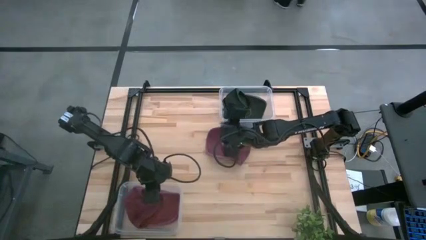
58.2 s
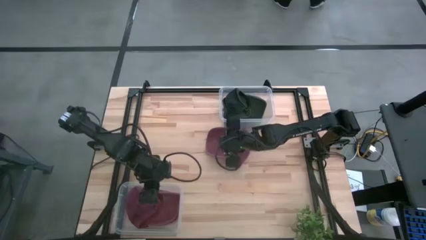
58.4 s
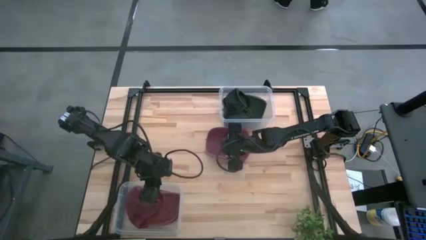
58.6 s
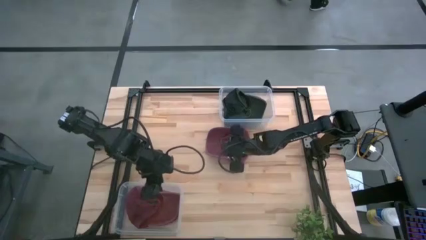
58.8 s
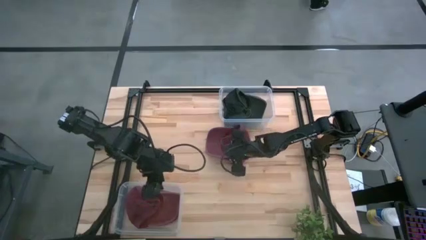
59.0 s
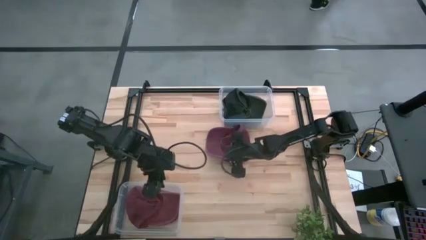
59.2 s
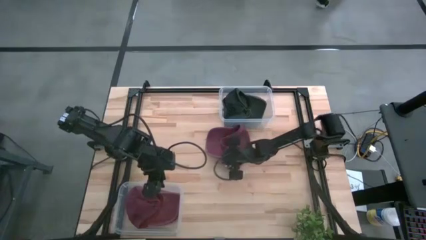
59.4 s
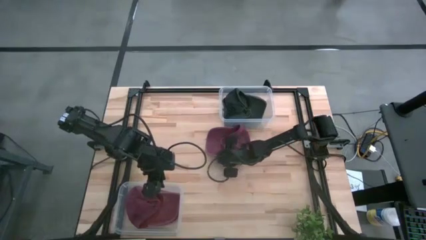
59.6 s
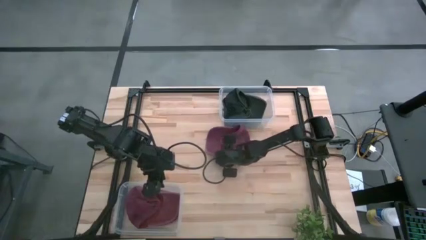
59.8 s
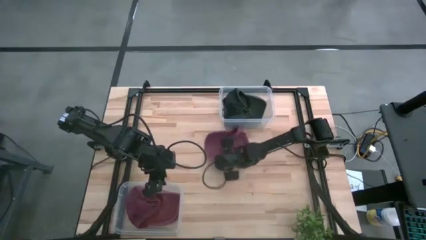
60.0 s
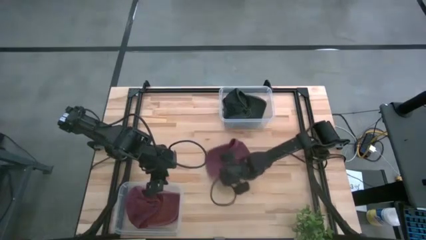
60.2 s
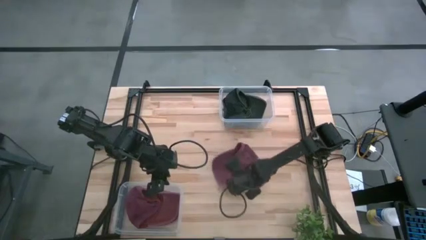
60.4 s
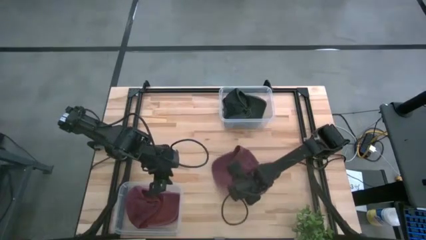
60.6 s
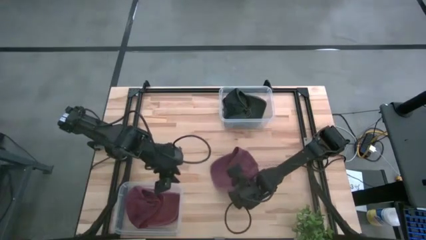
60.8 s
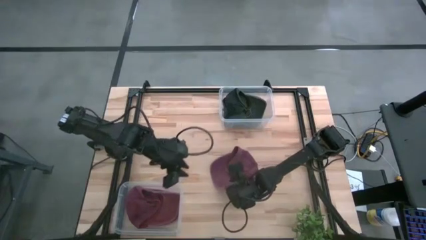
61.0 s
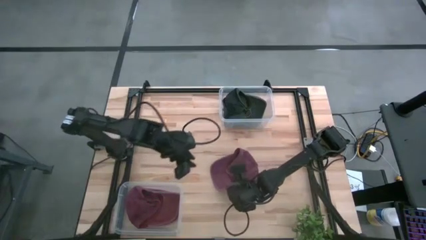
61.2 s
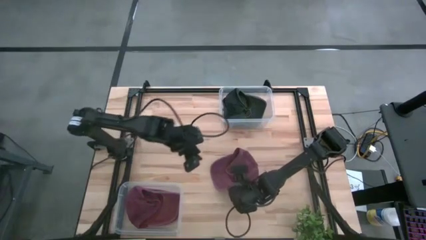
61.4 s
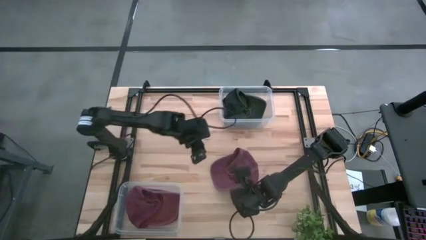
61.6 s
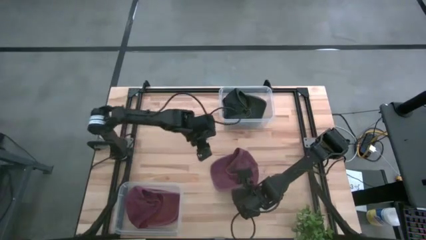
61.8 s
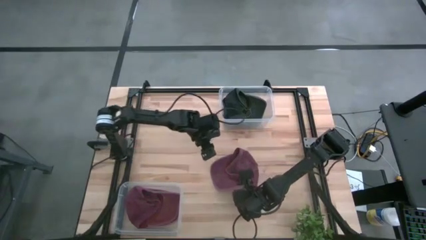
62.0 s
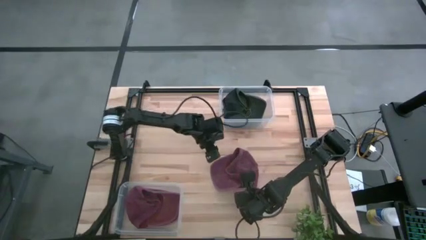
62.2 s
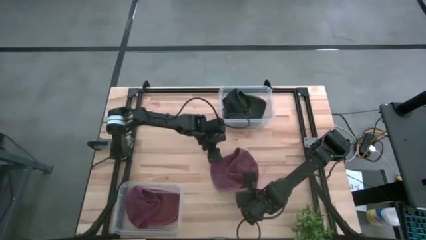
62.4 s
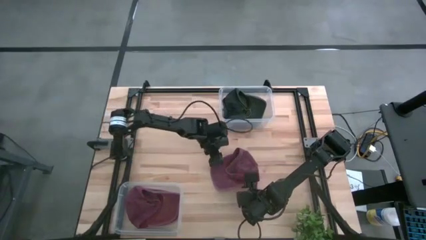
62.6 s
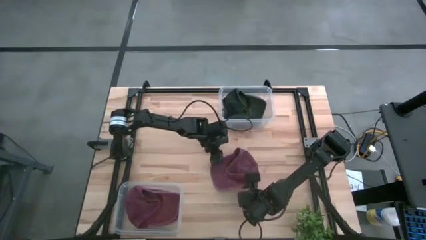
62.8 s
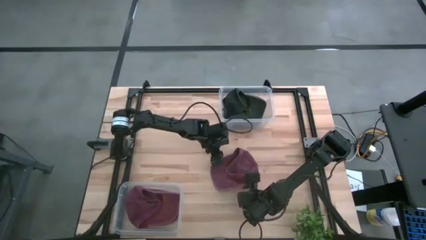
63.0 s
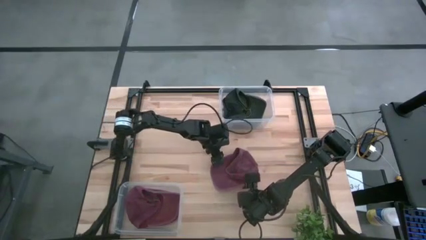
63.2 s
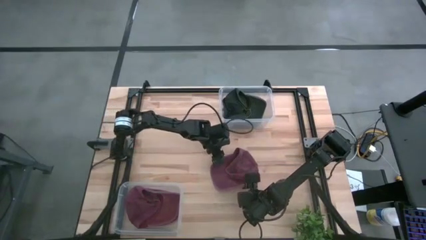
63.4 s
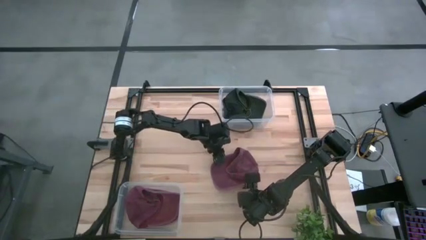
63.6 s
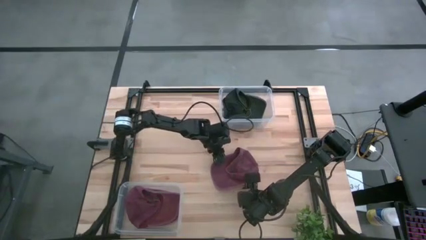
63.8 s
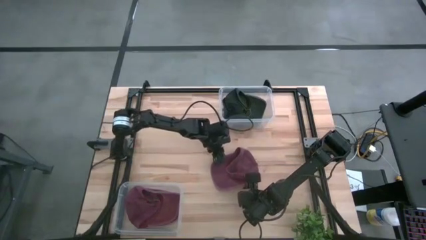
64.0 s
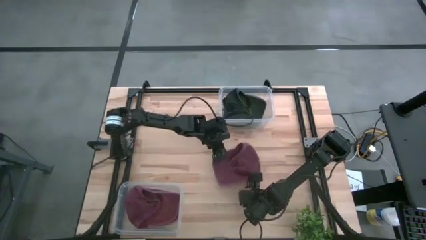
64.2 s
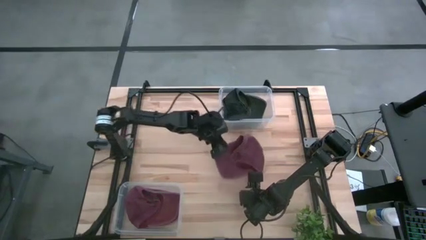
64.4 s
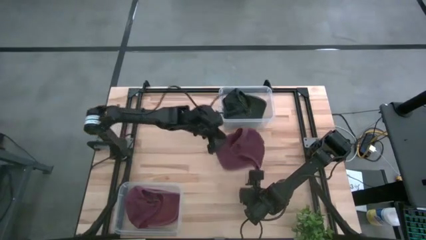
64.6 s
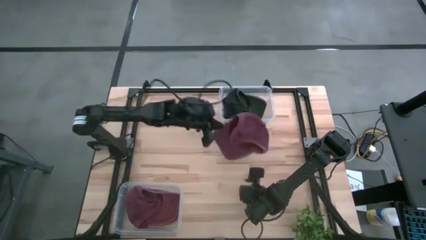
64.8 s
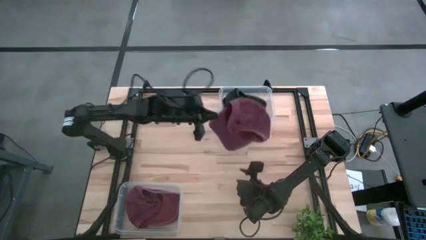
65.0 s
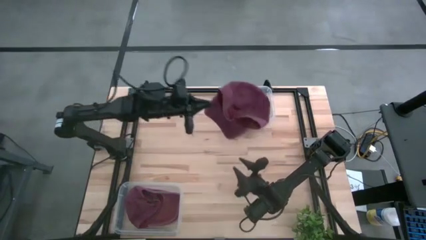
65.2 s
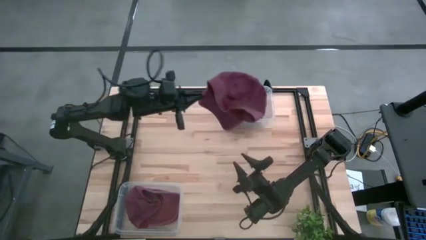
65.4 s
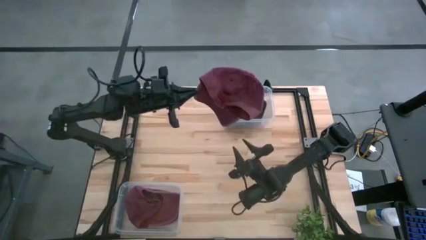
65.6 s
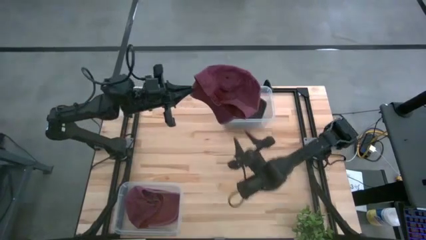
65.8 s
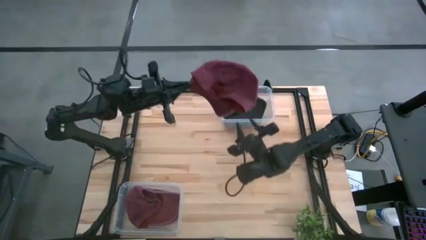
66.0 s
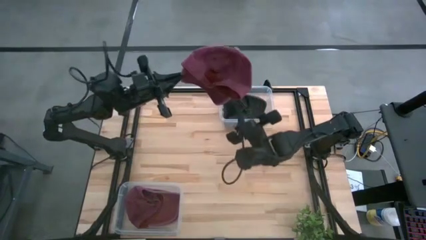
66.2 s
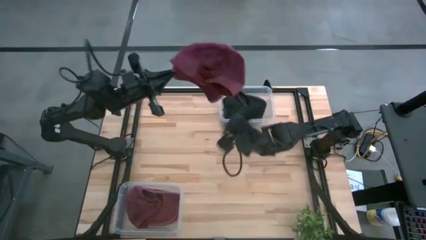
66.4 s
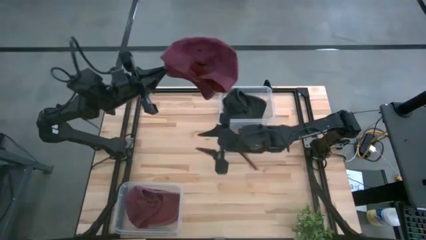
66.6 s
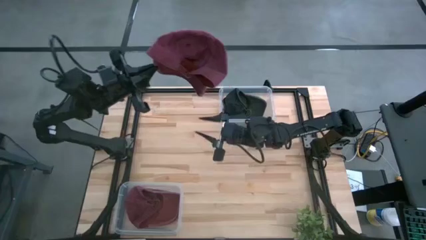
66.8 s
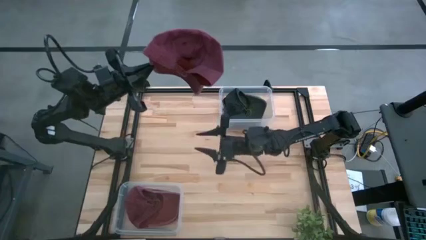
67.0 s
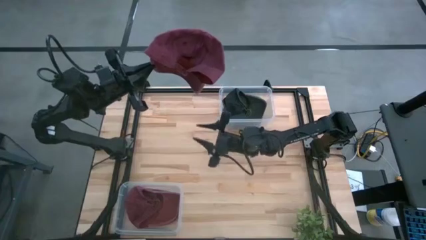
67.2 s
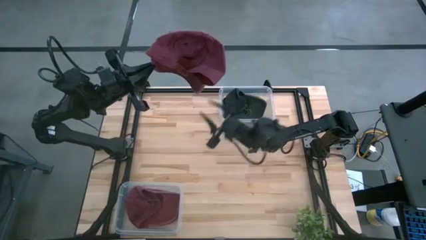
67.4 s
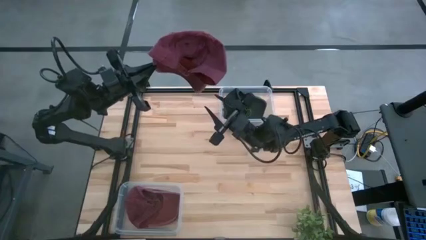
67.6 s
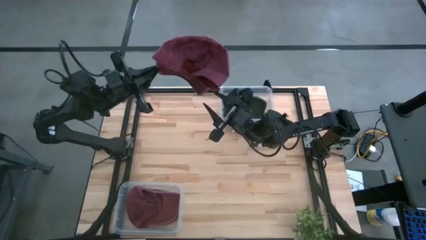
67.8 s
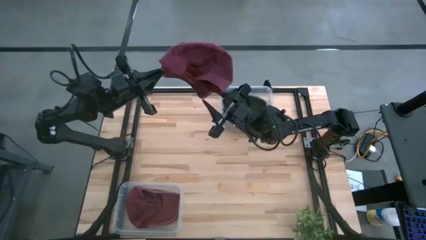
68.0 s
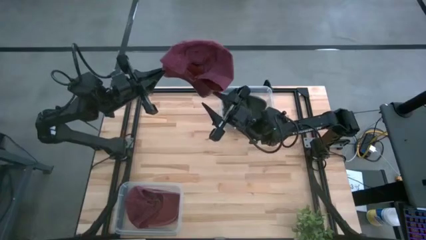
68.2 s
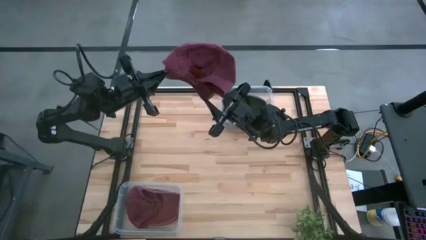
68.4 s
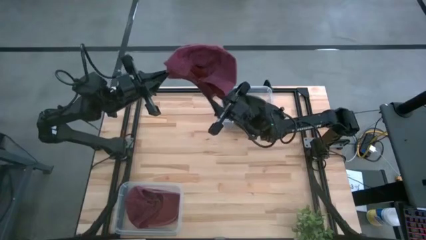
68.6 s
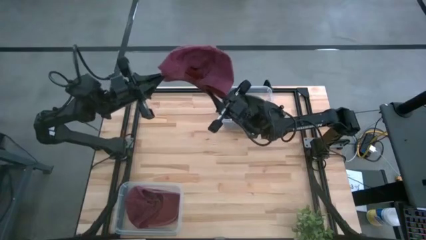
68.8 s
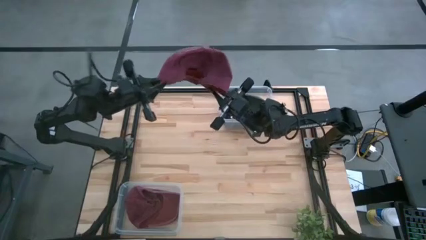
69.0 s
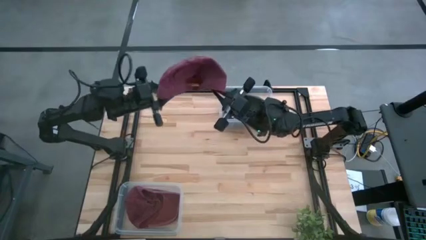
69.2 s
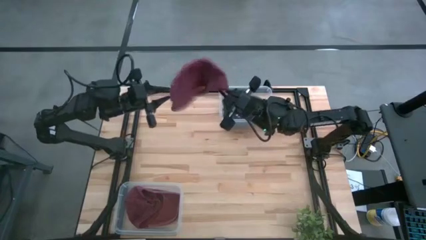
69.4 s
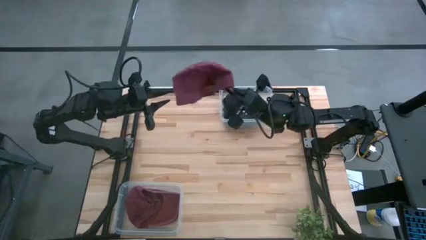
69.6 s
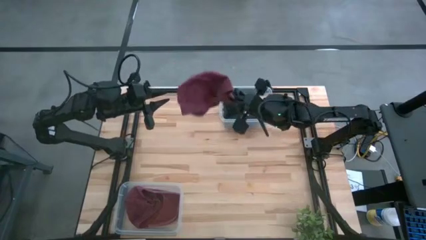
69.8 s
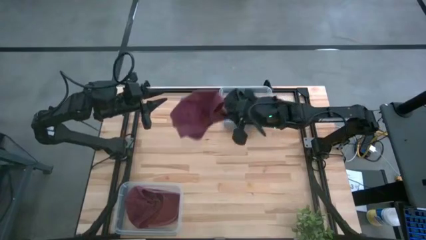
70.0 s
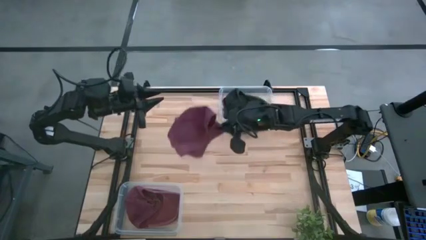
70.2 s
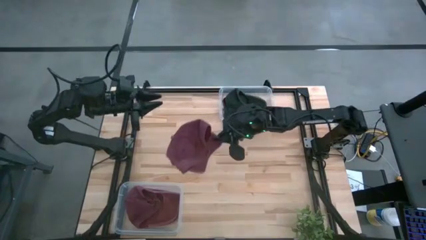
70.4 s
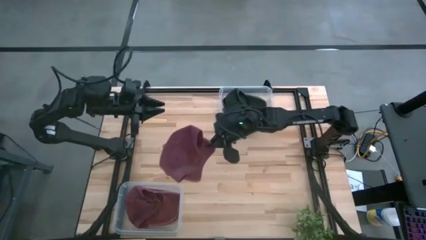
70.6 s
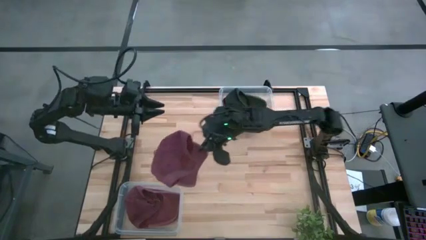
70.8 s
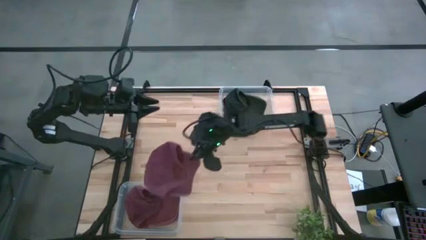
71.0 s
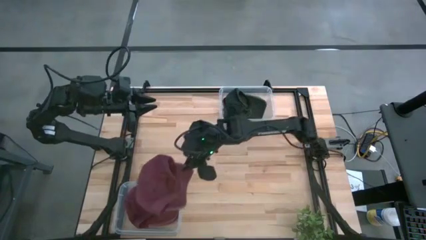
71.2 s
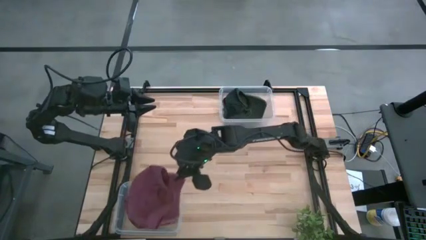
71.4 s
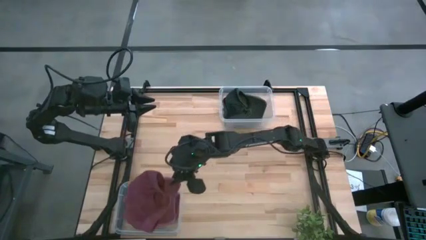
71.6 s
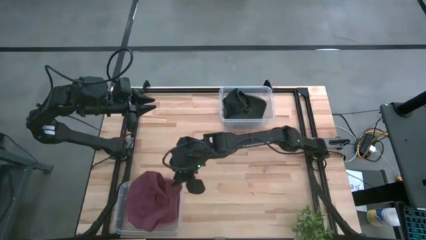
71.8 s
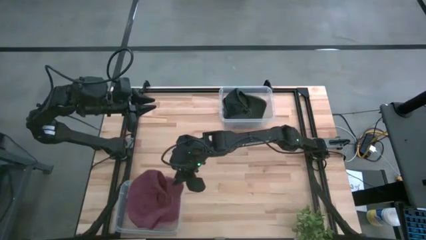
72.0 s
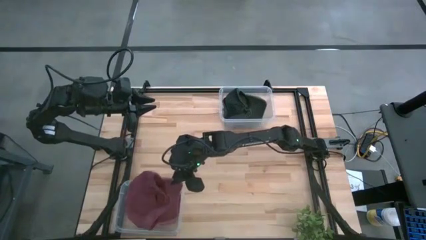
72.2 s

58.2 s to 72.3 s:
Task: Pick & Place hat
Put the red cap into the bottom transparent bin

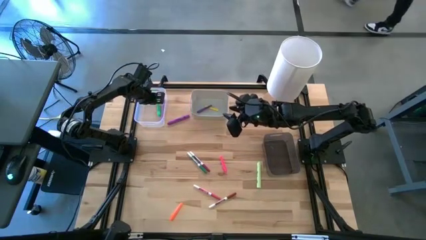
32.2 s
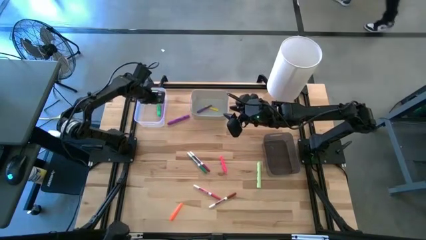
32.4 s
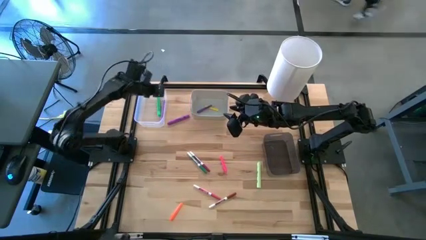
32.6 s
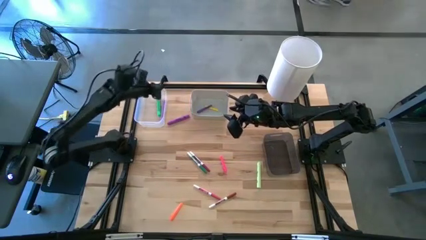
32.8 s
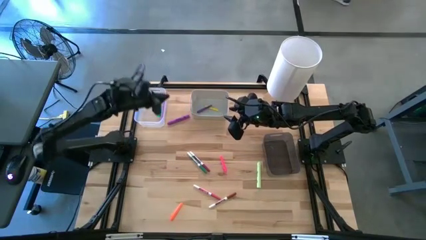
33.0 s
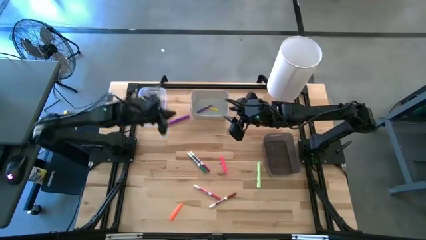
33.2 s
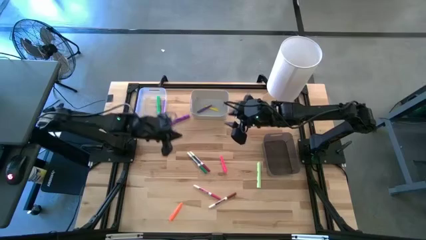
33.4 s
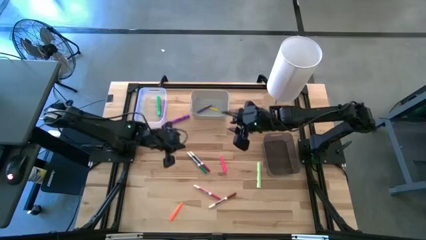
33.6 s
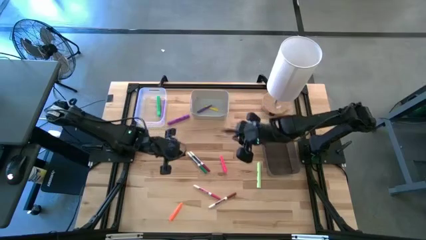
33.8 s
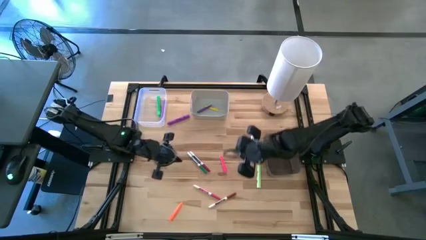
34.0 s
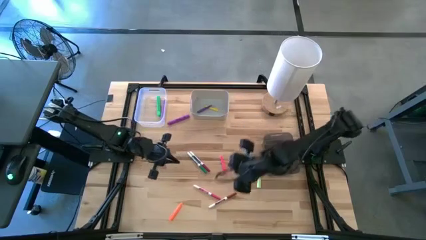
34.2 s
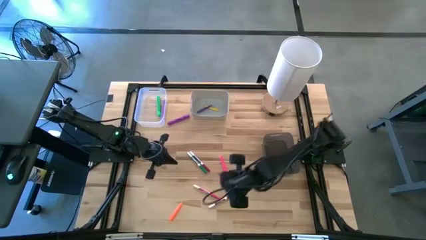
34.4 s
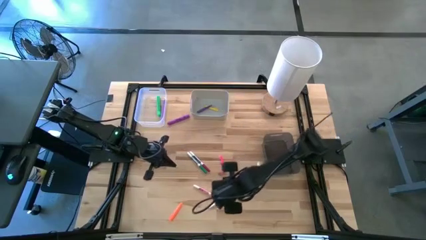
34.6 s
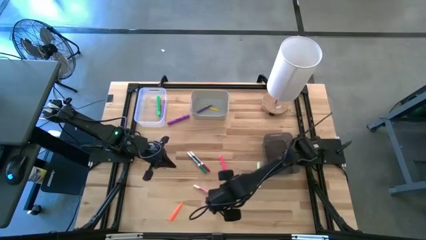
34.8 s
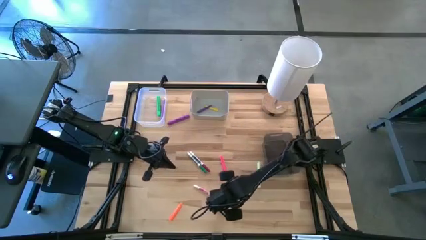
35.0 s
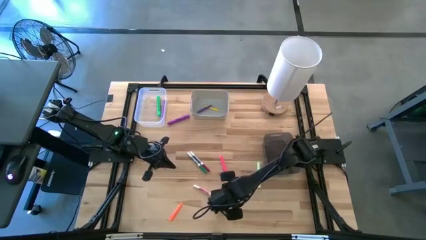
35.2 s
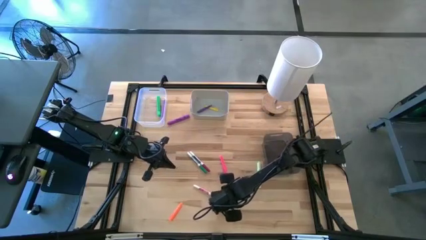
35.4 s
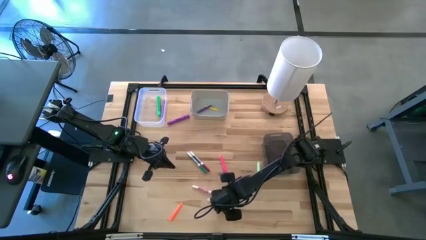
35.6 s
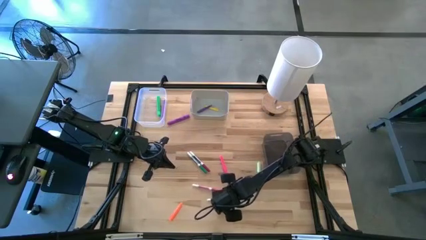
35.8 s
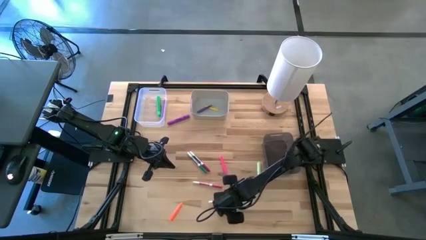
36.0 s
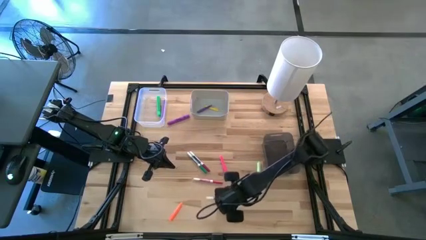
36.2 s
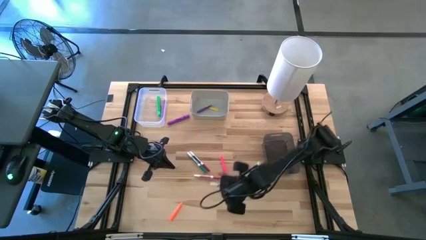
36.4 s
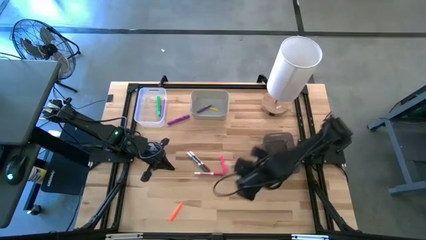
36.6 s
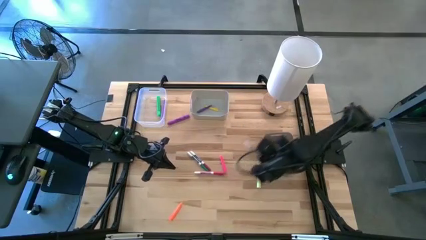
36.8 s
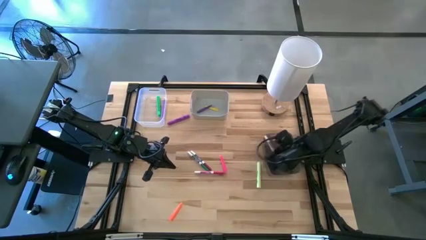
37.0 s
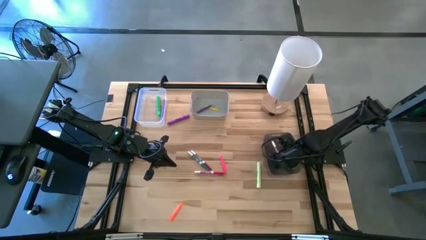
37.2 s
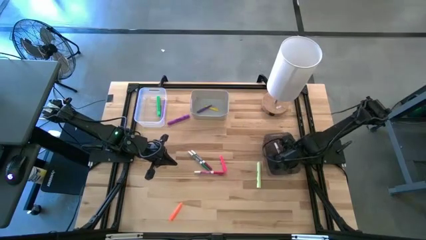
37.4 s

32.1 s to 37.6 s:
Task: Pick & Place Markers
Put the brown marker into the black bin
